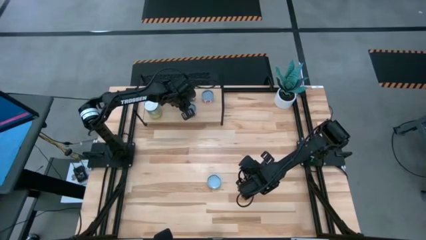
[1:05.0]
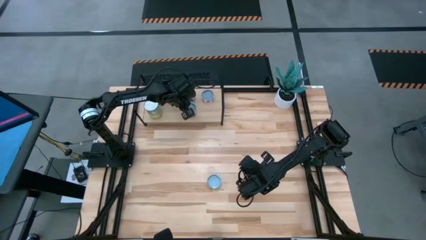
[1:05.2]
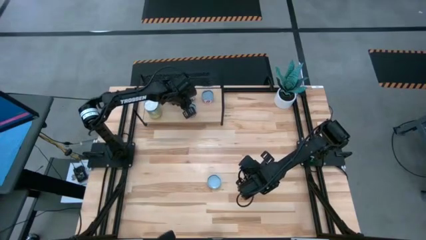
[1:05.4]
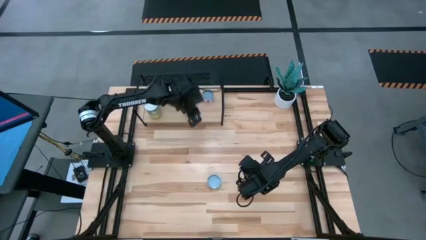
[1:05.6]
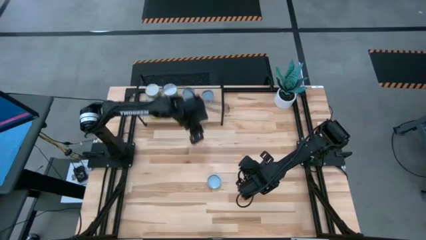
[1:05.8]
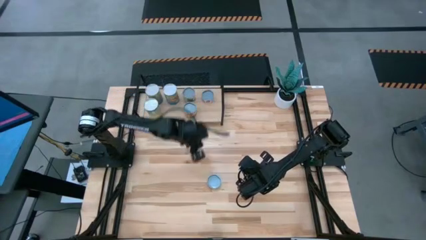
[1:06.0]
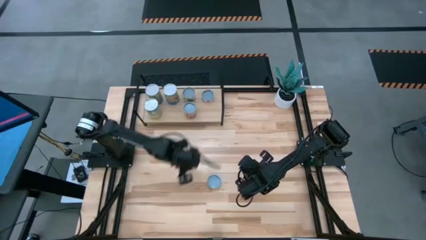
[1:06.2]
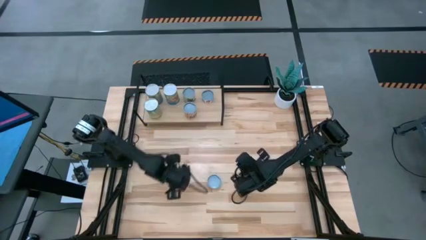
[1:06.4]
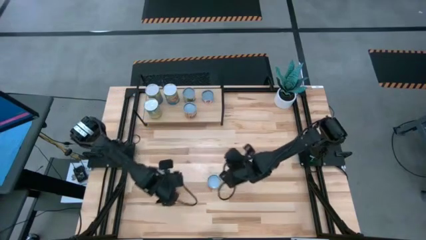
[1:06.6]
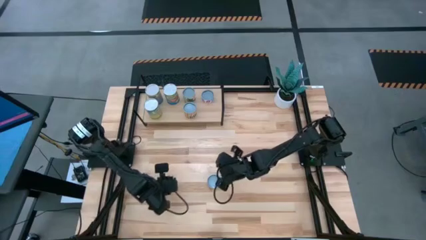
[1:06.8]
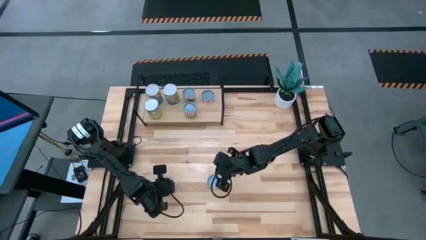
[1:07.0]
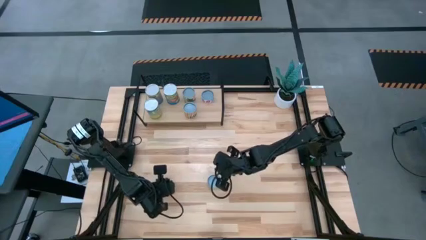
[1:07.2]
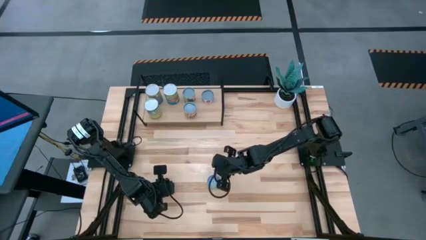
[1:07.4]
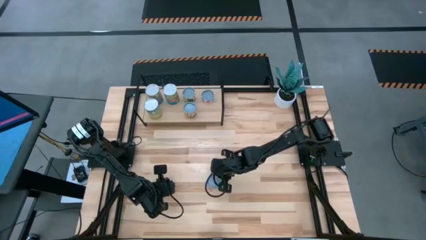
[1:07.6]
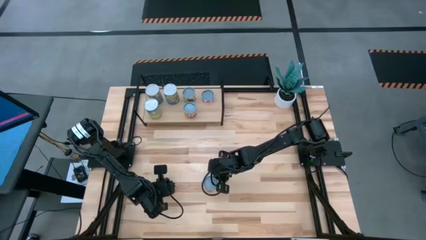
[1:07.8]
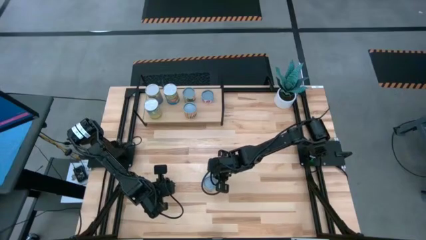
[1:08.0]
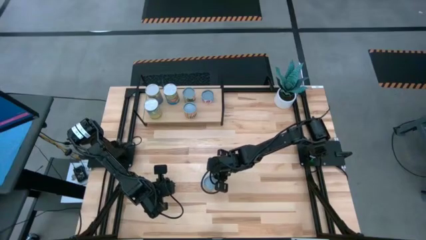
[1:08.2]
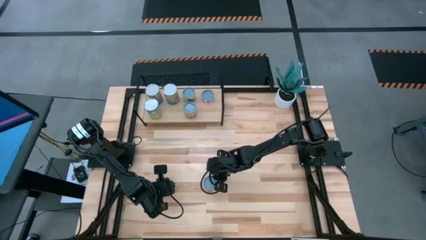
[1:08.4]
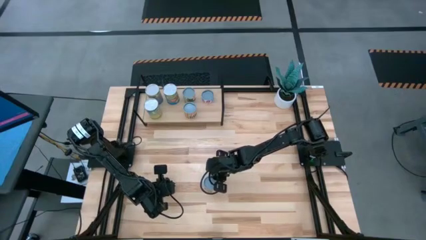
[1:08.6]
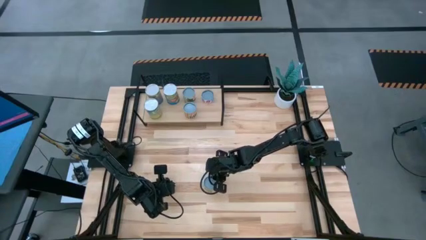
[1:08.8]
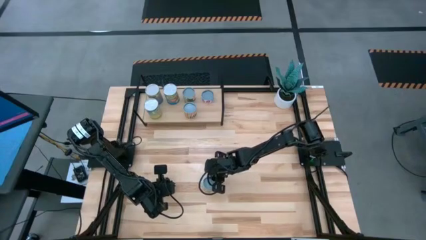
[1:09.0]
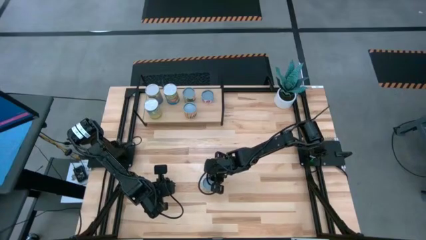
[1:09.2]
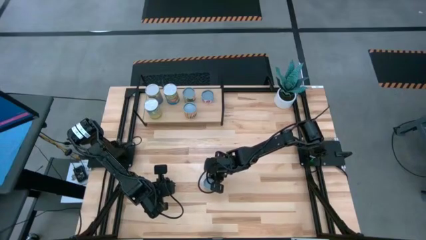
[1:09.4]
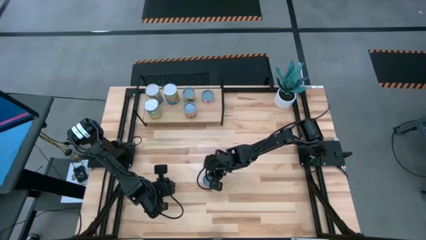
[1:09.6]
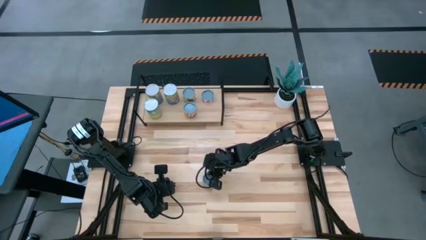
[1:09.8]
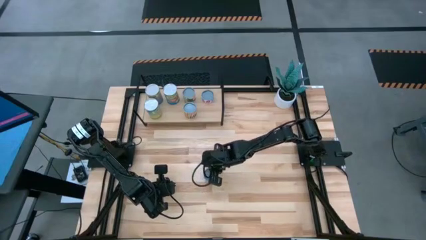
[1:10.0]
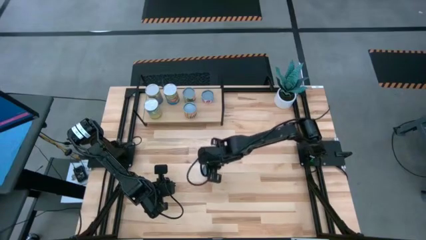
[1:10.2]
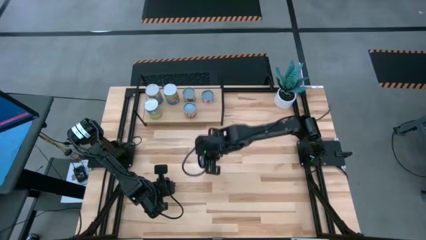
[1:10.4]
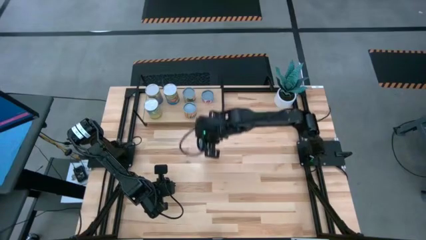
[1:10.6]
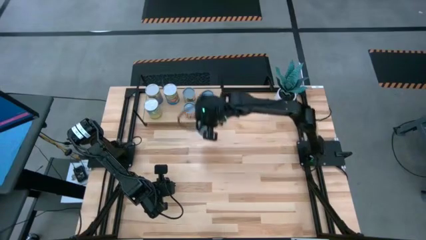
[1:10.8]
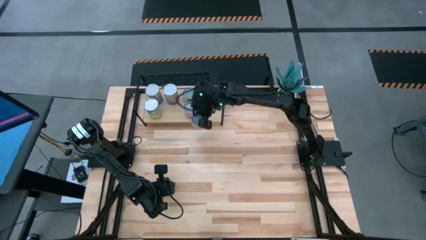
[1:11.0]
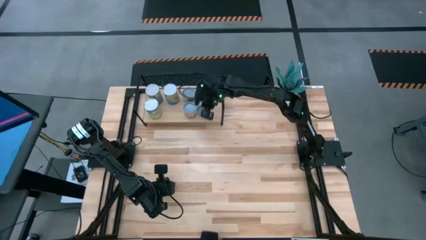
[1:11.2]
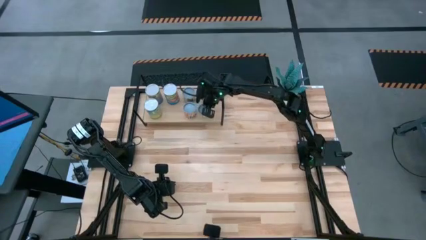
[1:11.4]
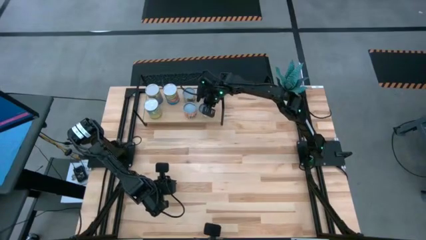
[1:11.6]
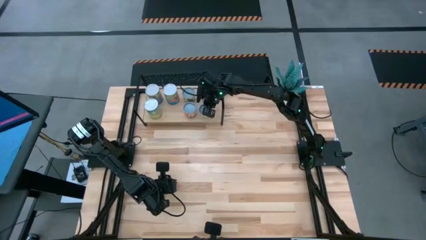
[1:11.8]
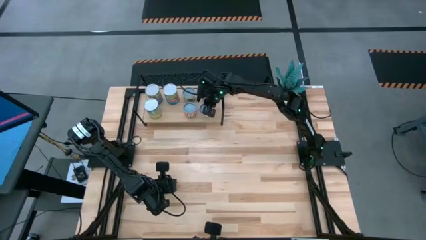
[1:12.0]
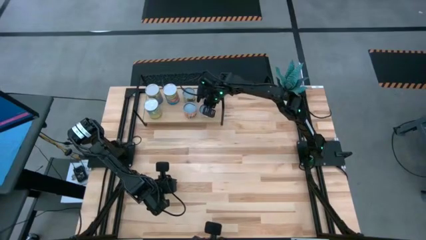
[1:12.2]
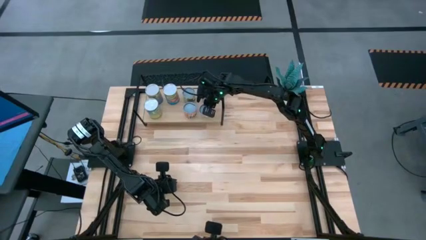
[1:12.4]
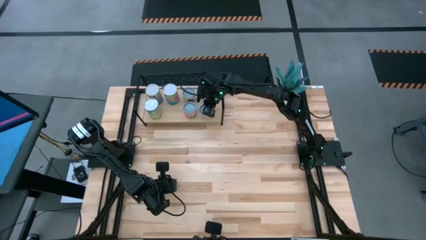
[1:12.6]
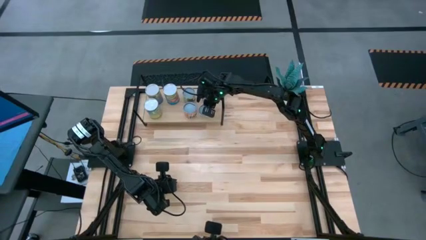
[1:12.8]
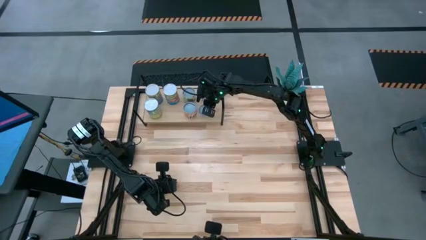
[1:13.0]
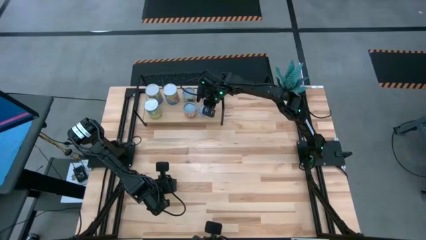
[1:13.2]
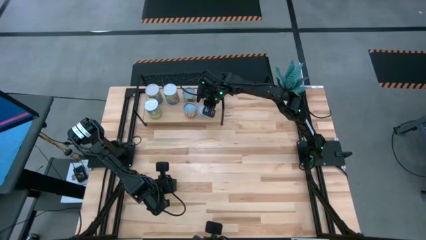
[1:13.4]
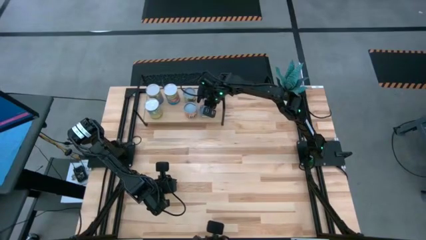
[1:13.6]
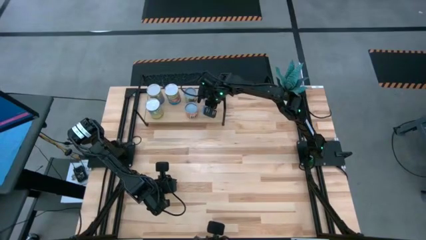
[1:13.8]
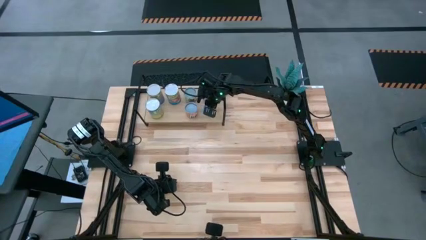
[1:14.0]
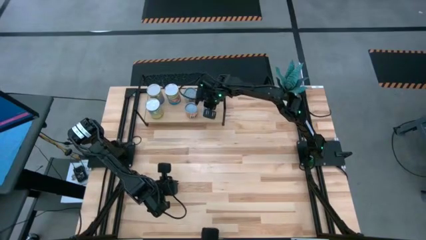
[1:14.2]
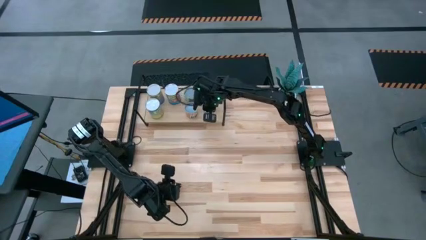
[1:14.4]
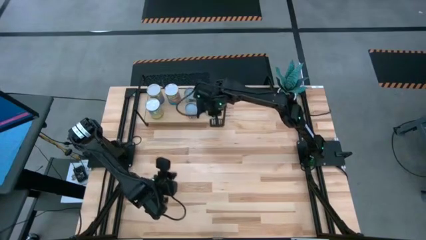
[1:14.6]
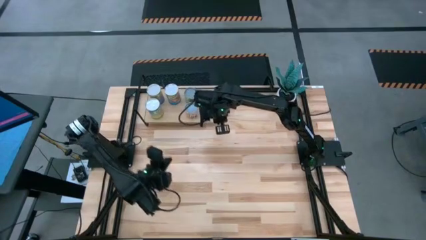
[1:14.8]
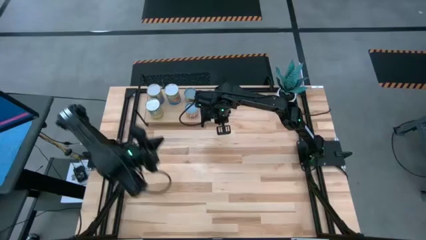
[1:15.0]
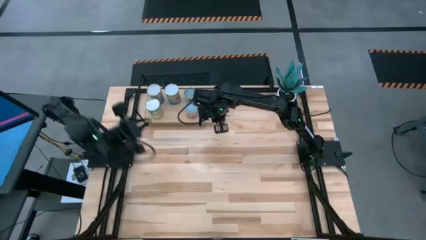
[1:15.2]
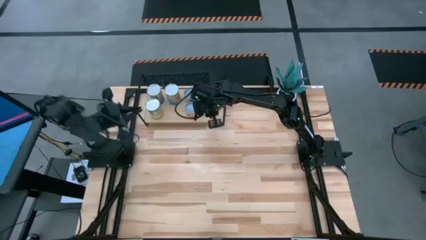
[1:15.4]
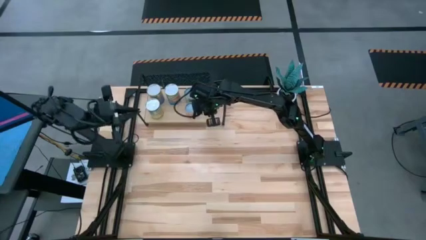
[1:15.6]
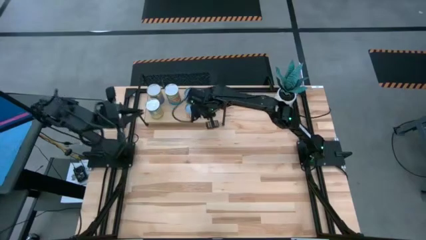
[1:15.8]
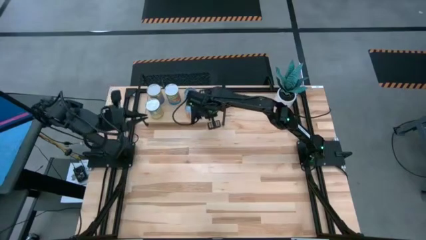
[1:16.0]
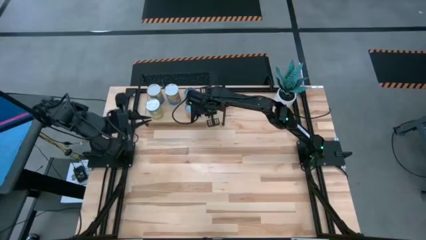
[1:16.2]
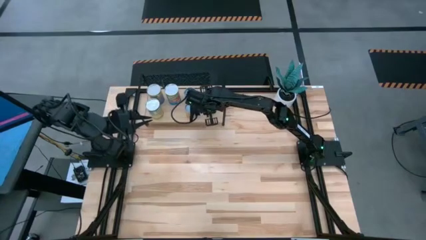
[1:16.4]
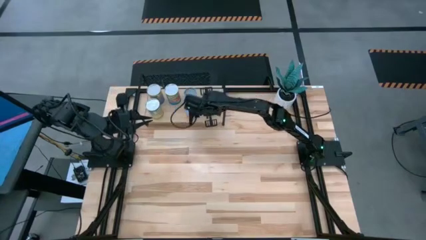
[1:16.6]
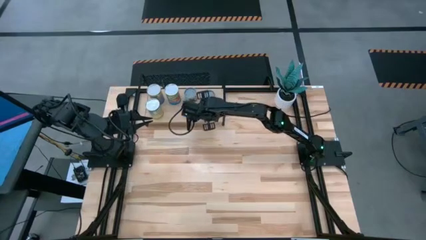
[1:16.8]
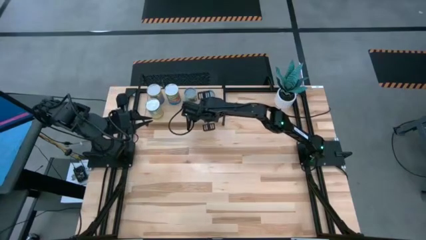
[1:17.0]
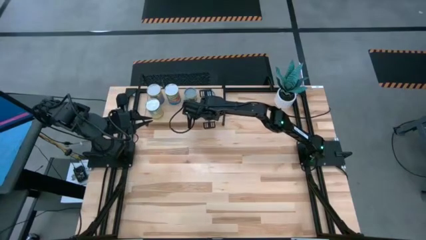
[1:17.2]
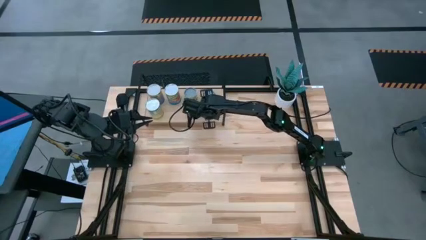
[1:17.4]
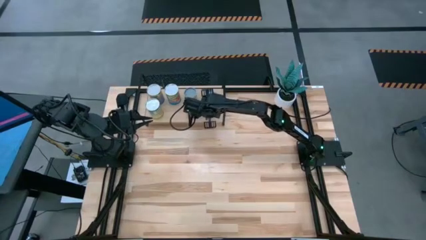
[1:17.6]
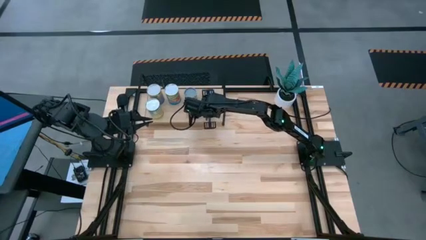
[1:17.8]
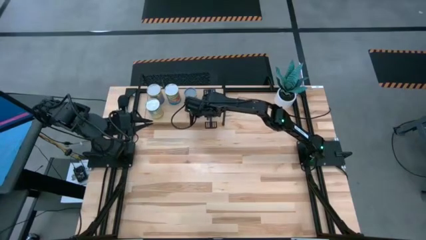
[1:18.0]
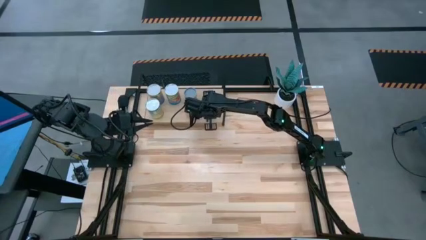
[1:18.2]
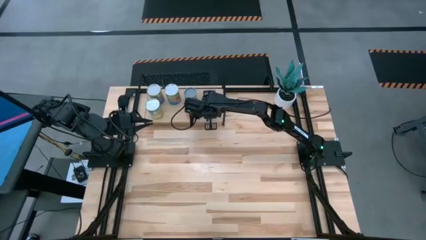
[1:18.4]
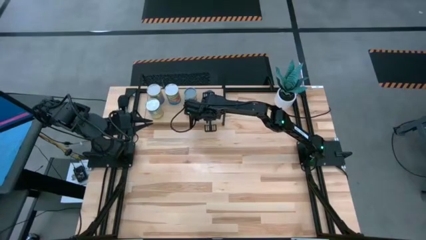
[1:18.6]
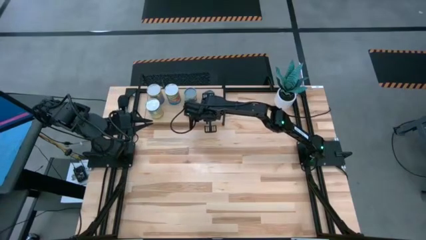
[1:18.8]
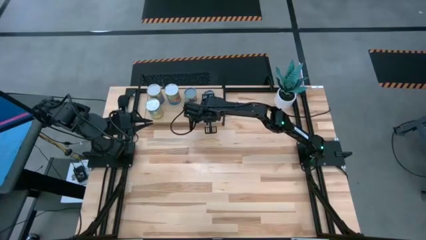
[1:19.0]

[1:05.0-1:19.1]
Task: Pick and place cans onto a shelf
Put the mushroom can on the shelf
